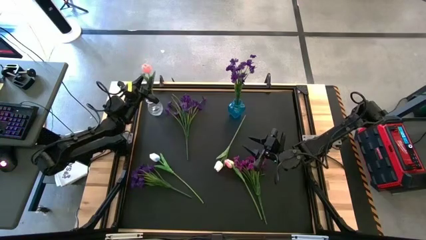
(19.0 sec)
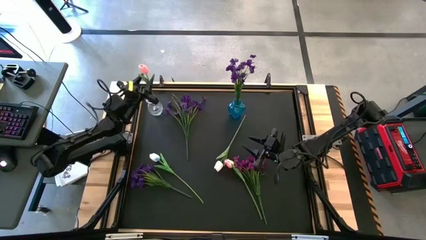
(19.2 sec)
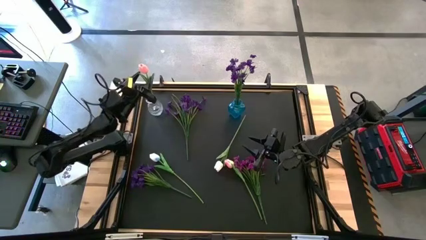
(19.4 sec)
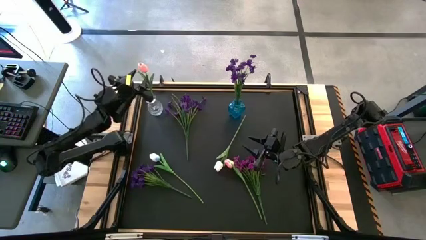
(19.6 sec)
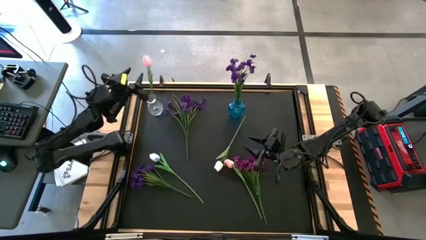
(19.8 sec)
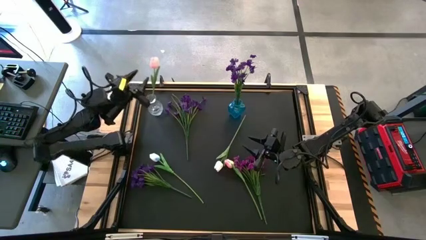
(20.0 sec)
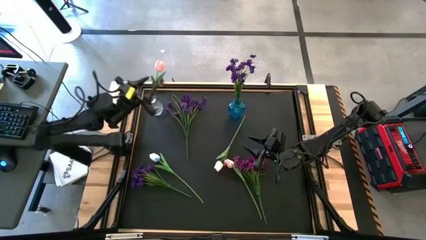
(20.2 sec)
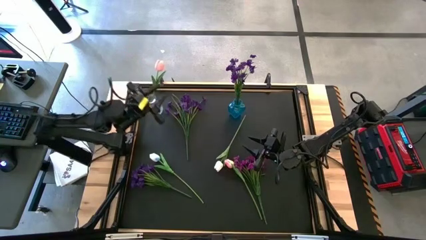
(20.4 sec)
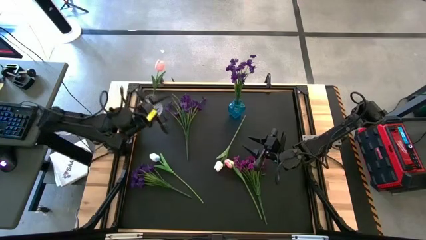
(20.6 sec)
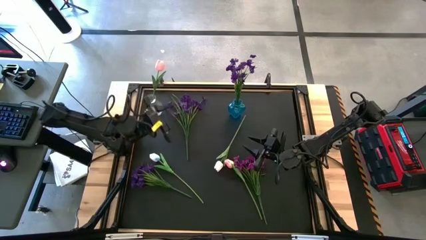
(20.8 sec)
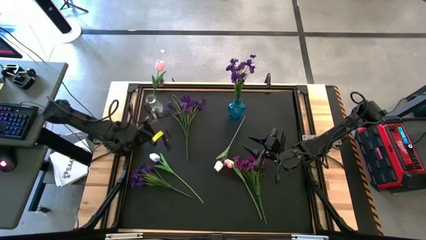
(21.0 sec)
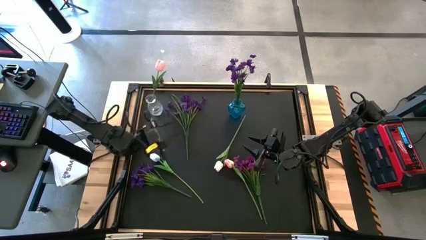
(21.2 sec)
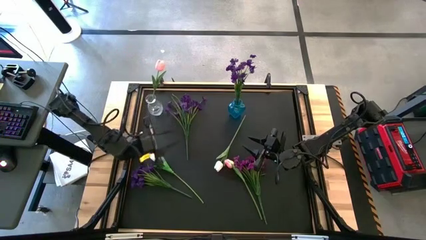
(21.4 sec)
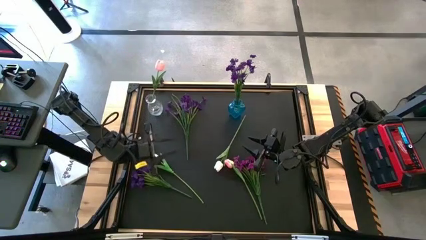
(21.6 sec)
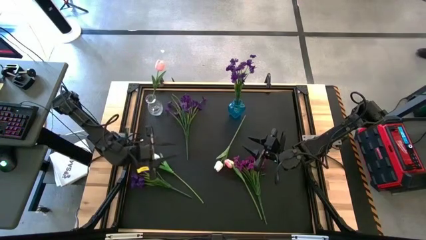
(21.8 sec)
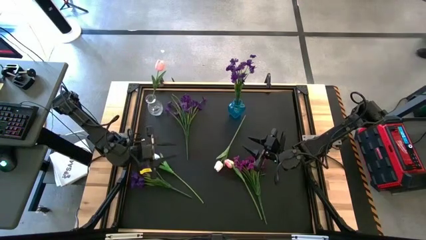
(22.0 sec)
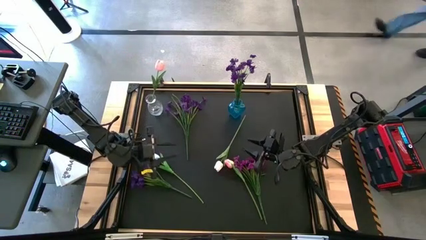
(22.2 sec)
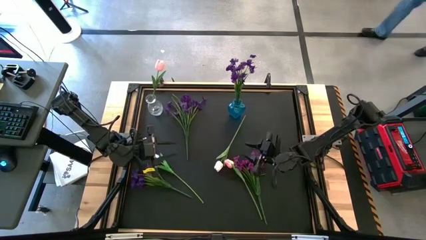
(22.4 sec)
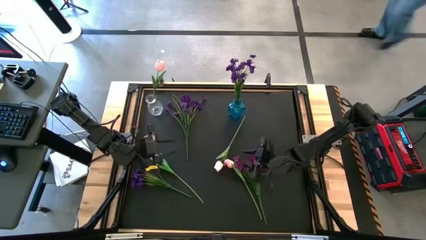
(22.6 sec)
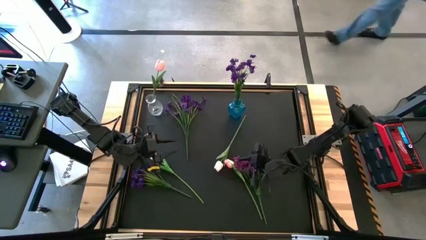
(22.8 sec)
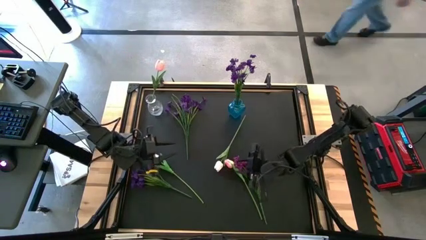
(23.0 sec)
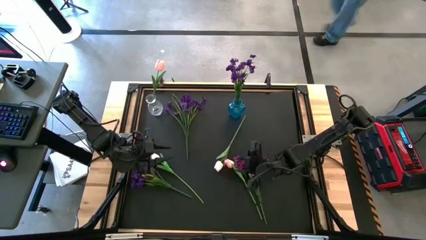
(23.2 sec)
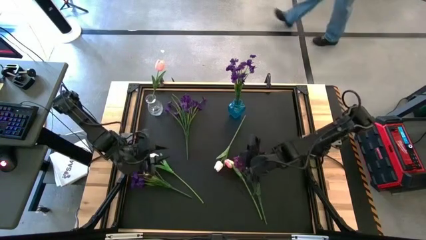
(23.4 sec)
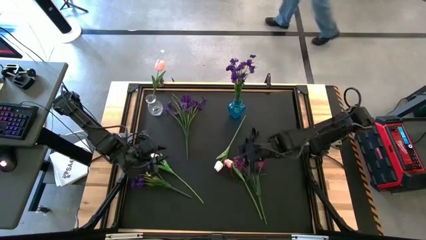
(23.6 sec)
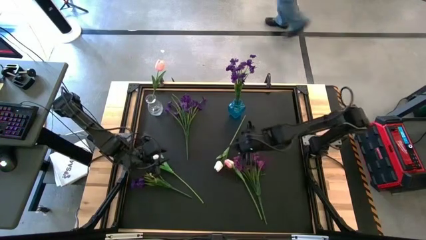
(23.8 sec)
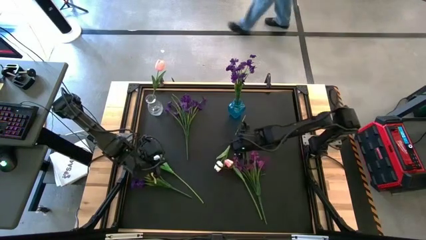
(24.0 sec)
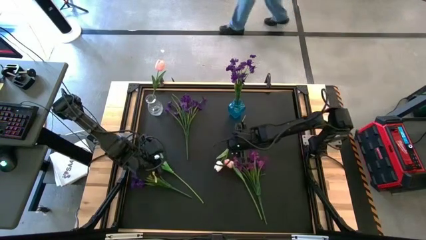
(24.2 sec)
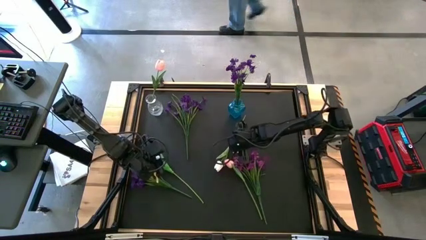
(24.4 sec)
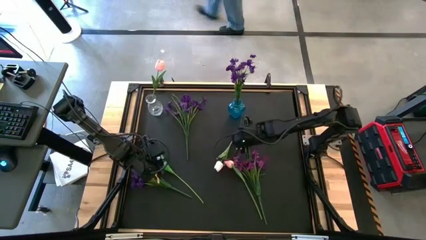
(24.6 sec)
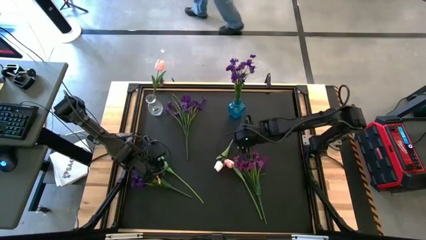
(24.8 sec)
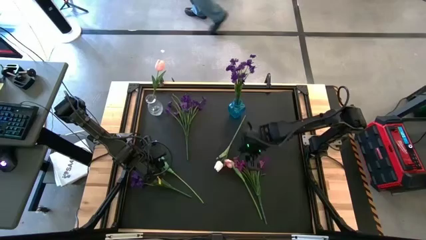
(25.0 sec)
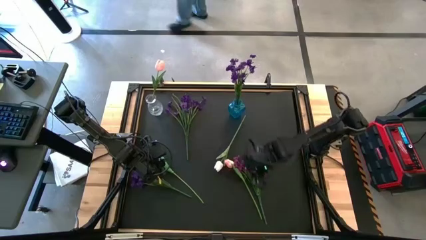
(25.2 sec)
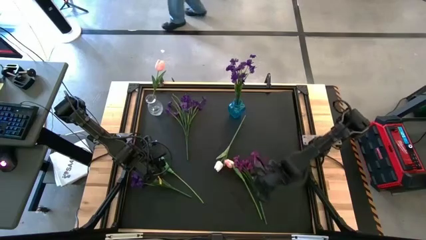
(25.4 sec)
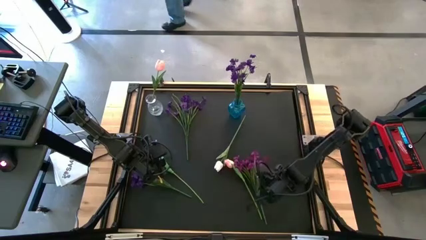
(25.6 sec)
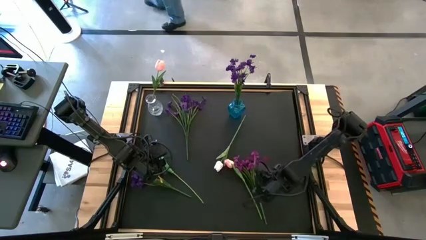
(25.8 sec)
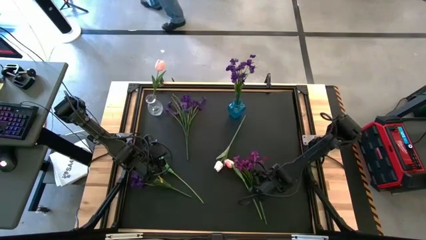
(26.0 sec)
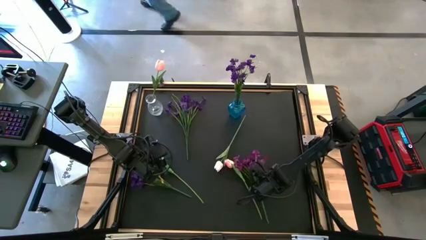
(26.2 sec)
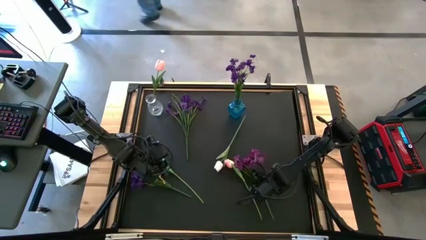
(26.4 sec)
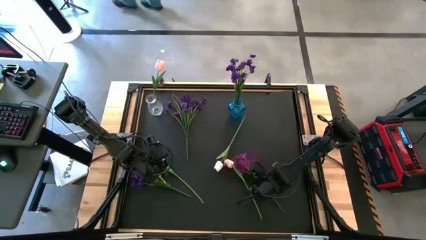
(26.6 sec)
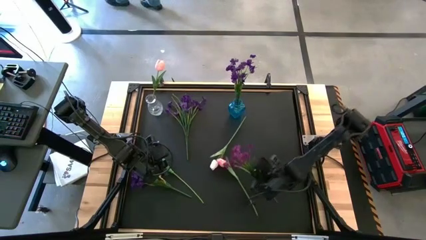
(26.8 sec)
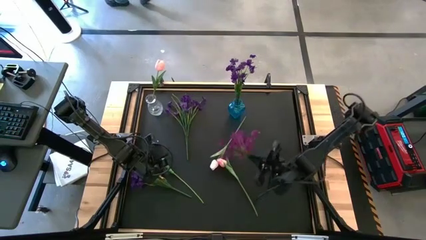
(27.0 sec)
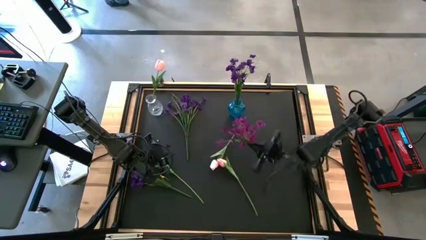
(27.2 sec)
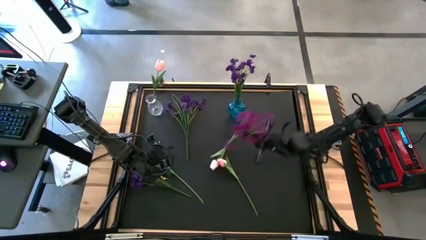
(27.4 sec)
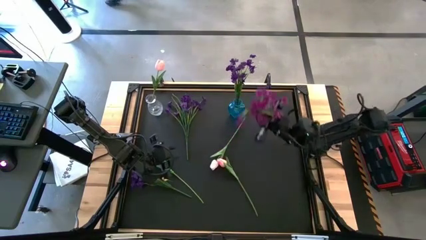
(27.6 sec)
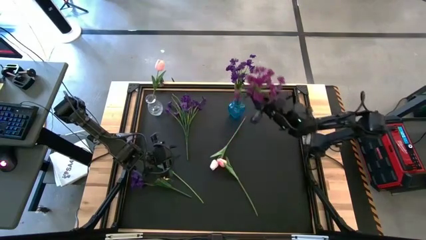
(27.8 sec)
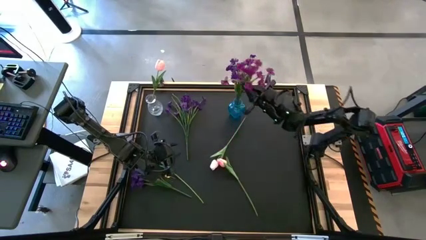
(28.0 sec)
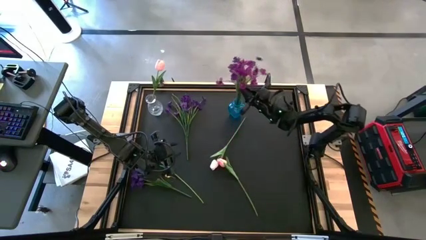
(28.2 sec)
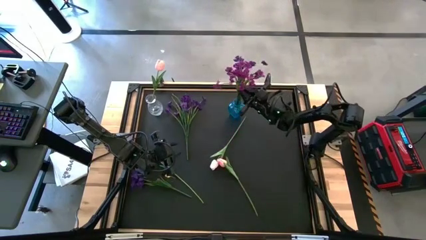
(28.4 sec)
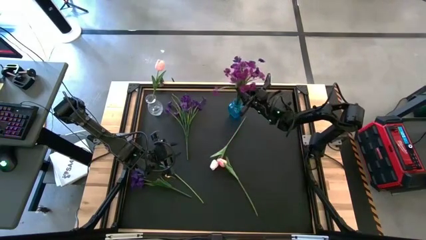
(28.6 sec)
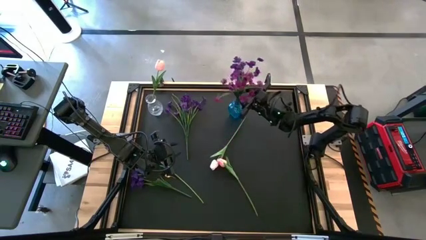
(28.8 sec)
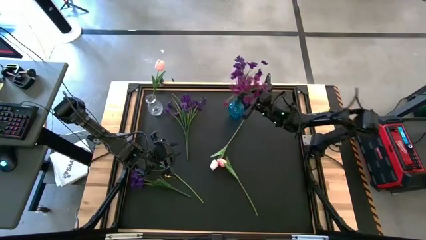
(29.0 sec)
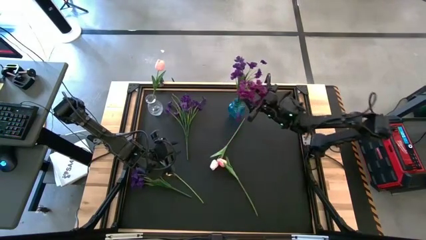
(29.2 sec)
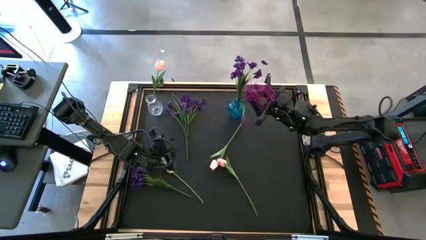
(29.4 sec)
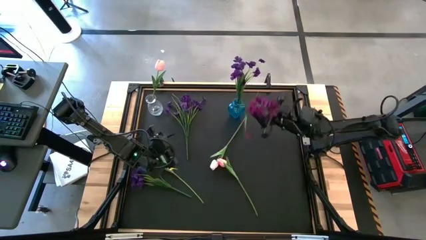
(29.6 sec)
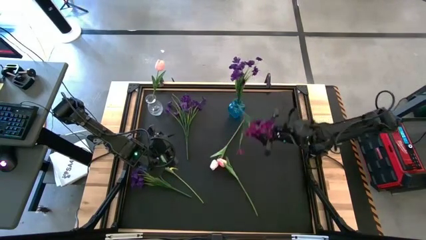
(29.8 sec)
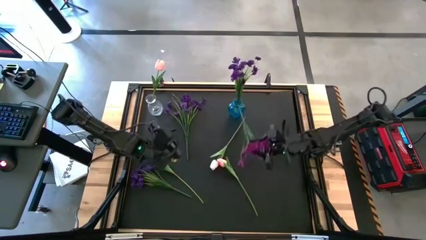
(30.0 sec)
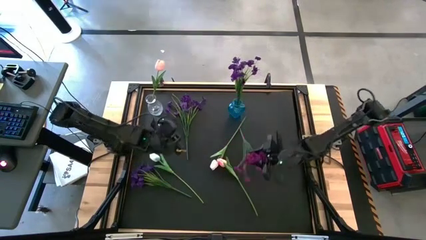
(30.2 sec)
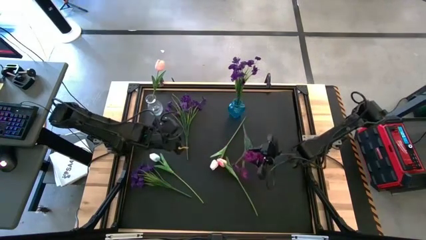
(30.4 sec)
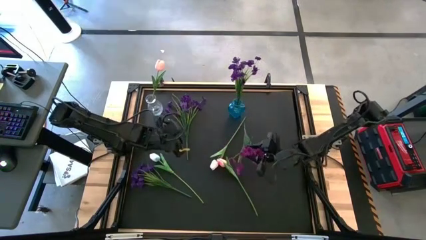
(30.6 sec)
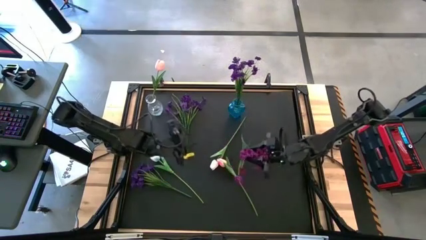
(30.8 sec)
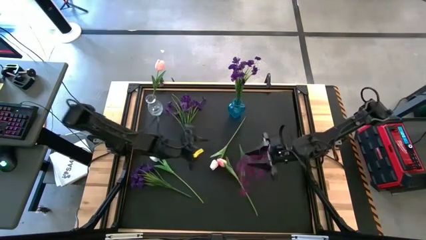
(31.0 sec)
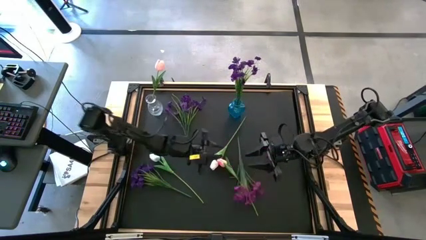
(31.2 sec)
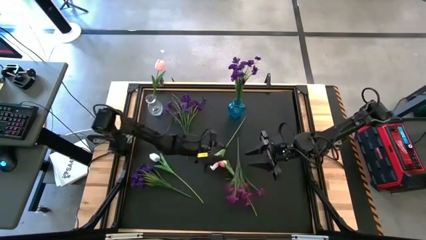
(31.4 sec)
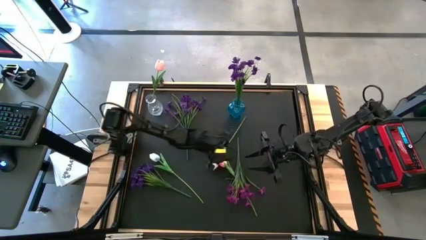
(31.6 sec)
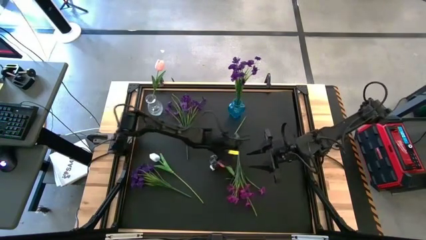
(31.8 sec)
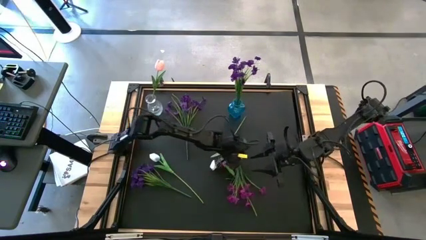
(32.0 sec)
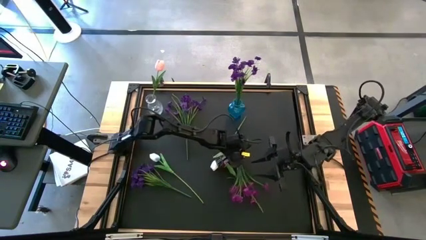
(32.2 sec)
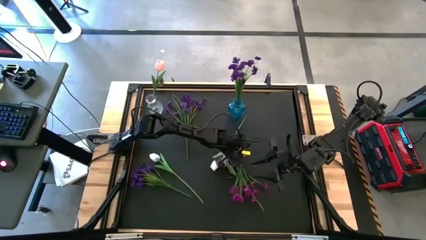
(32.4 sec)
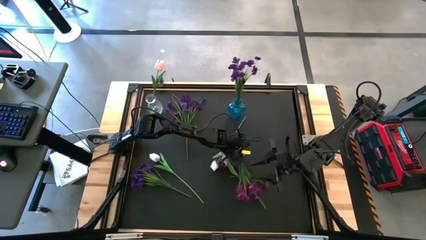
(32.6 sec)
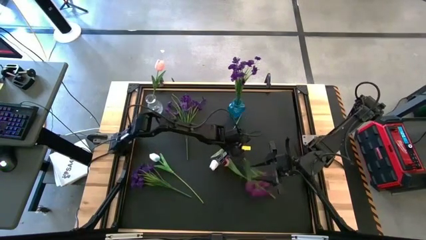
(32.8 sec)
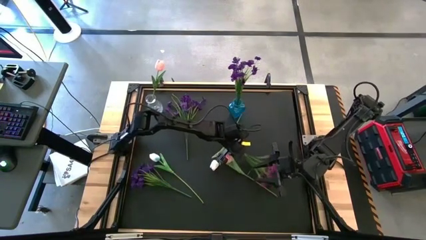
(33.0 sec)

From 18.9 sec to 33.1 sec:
Task: Sort flowers into vase by color
Put the pink flower into the blue vase
